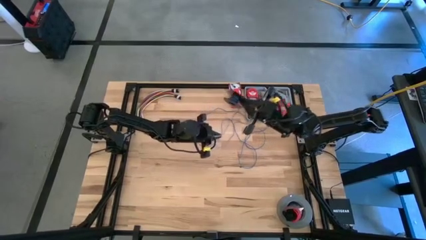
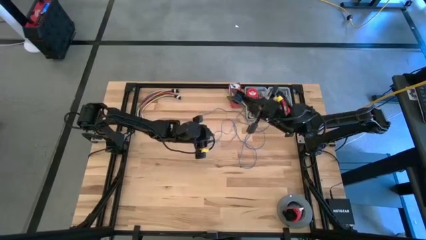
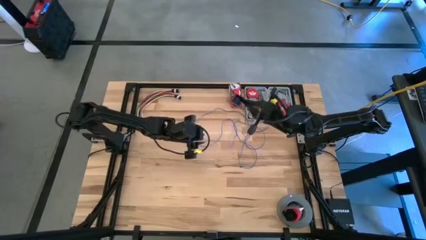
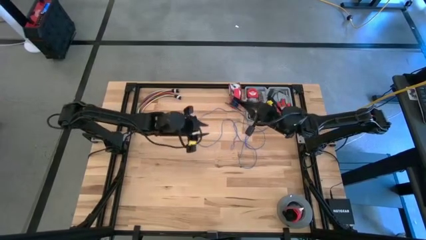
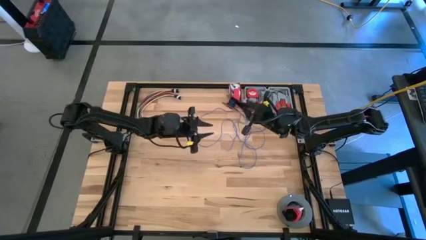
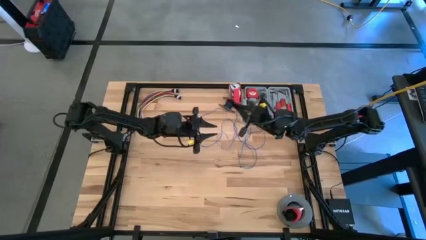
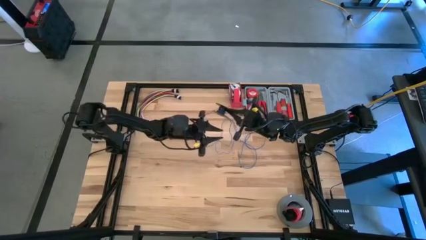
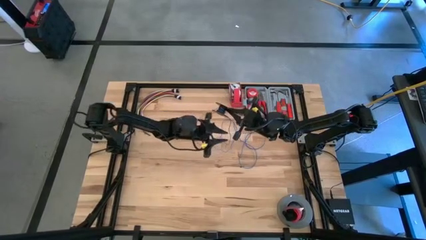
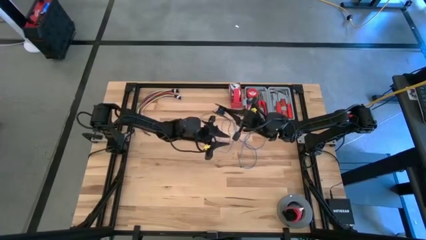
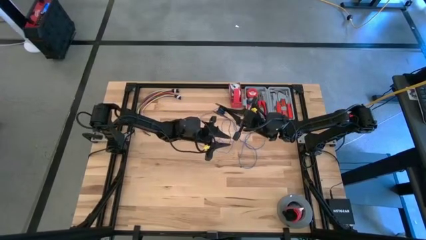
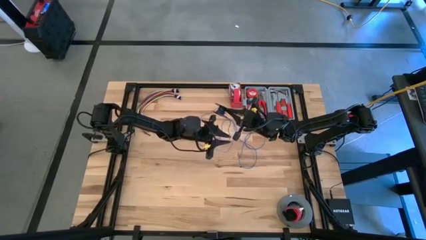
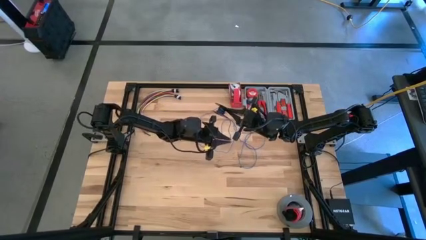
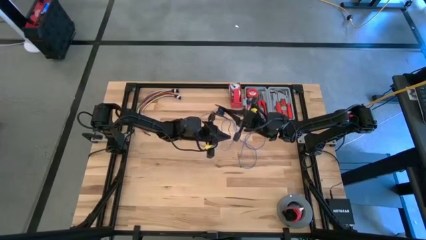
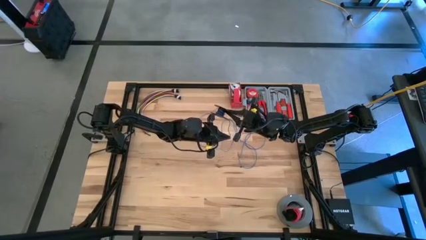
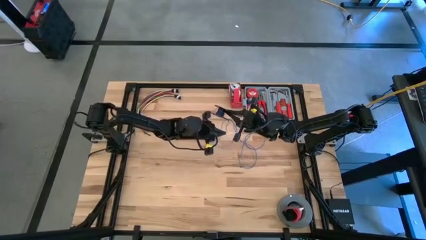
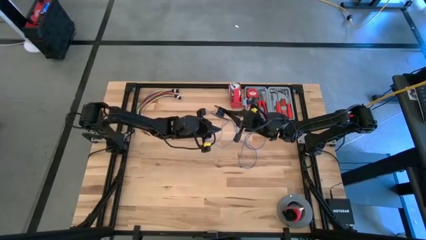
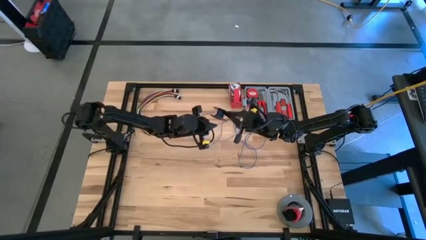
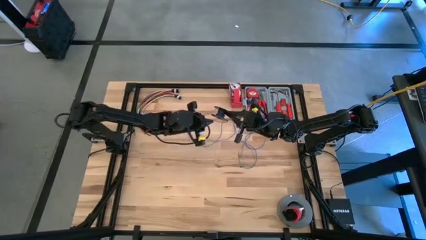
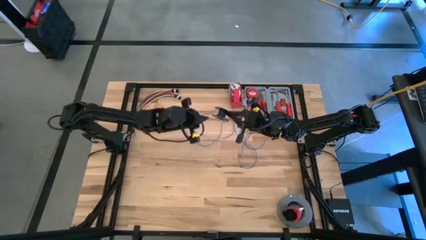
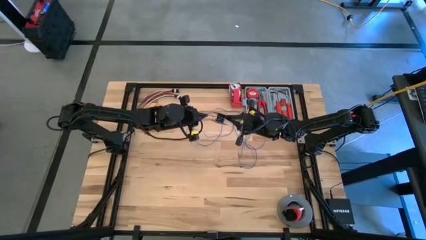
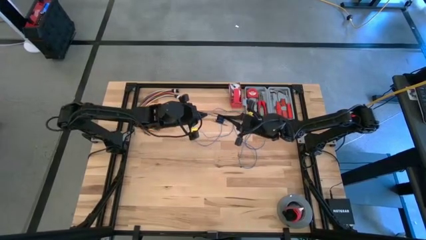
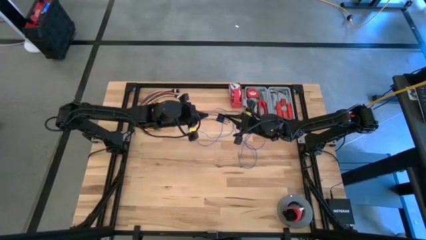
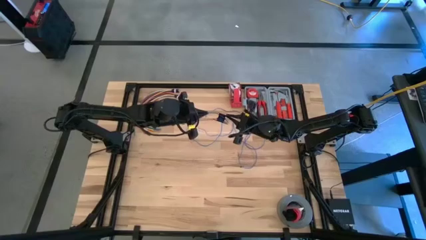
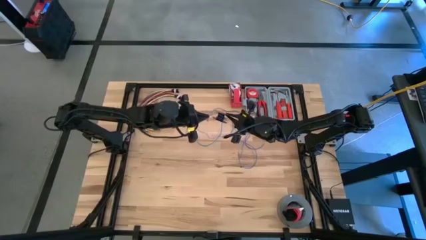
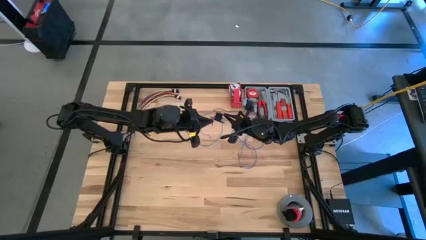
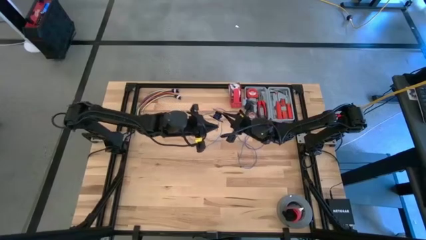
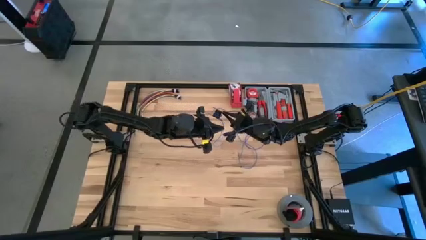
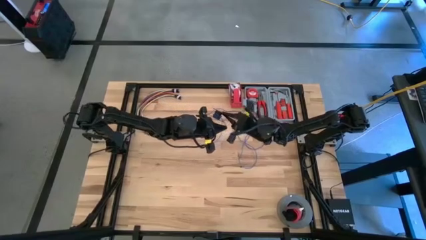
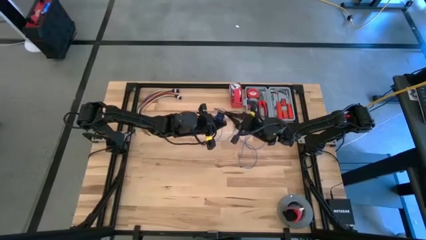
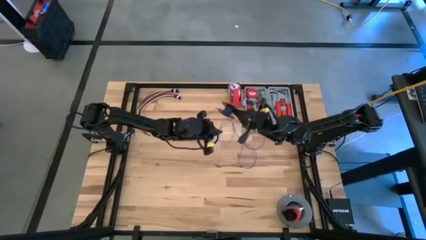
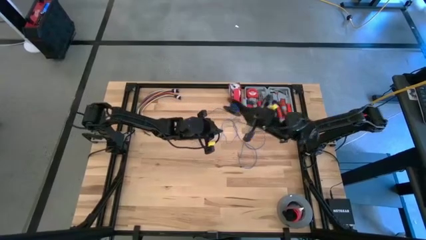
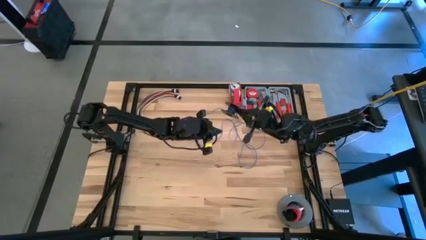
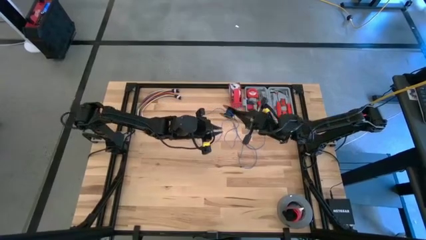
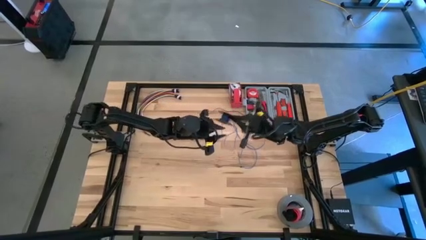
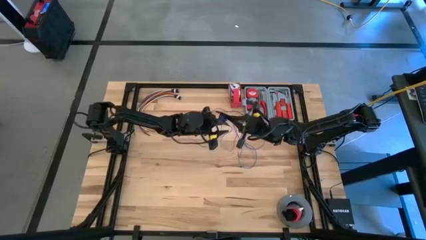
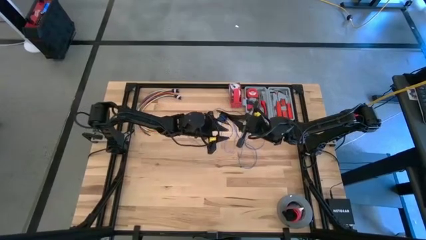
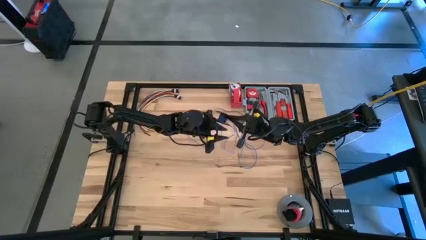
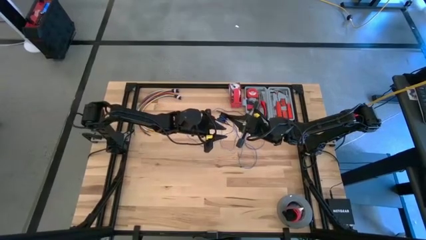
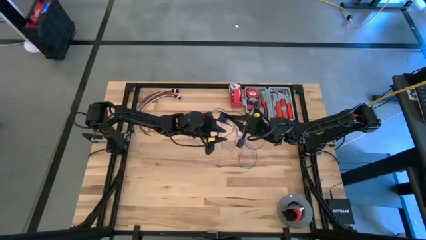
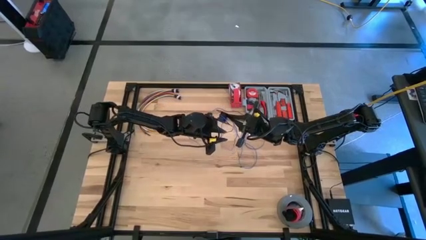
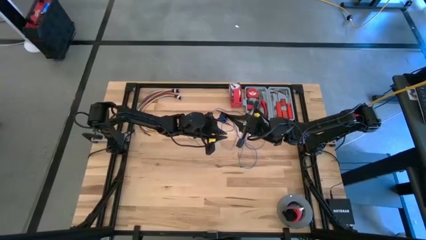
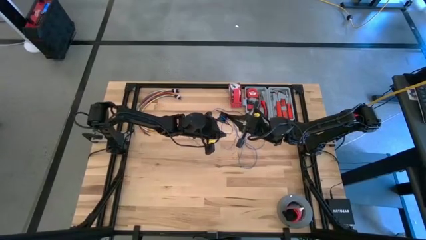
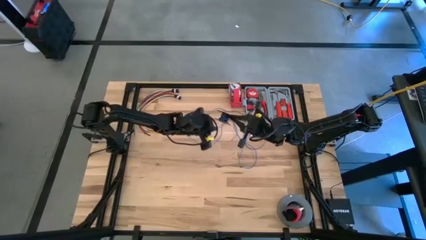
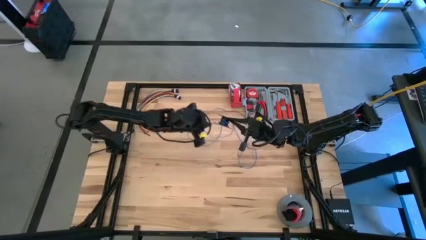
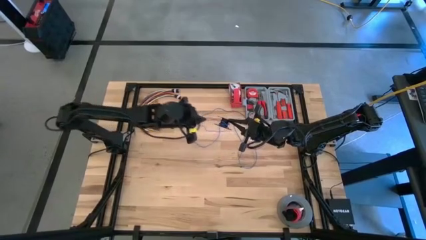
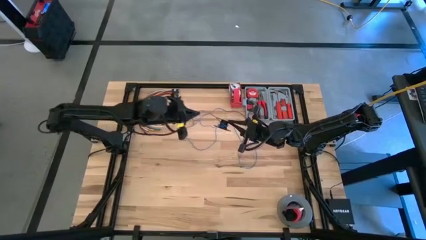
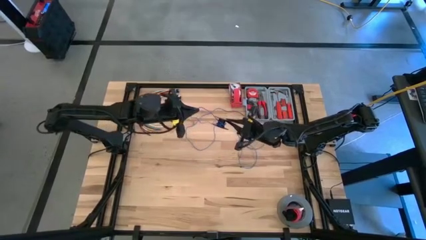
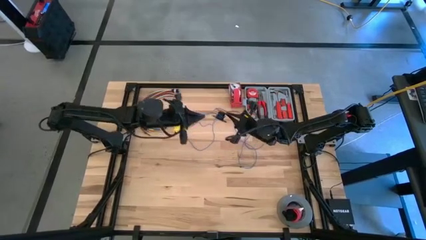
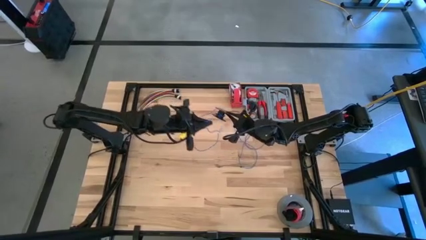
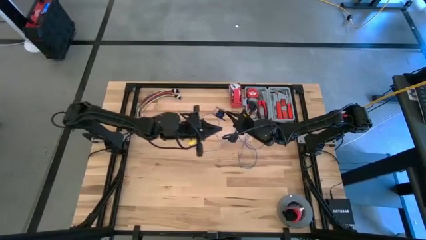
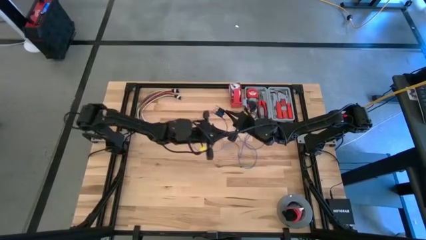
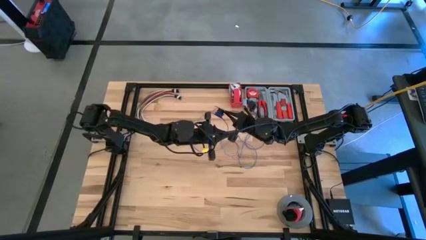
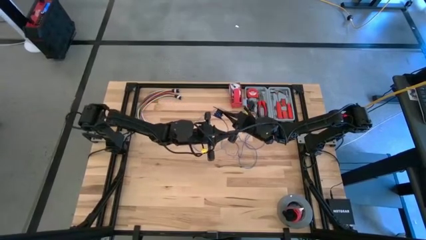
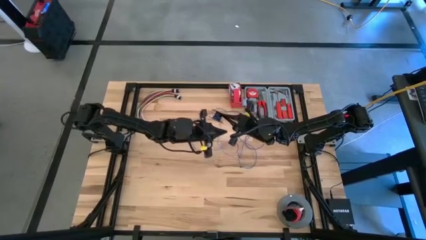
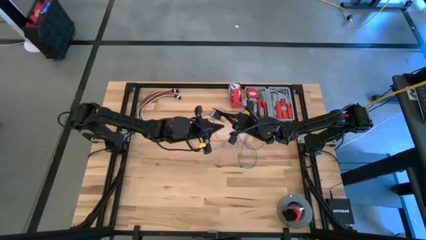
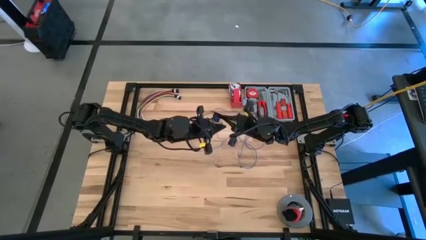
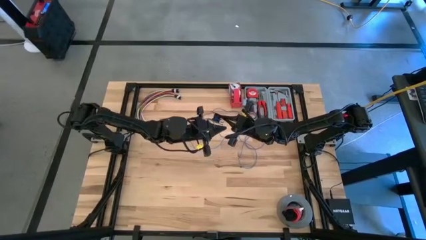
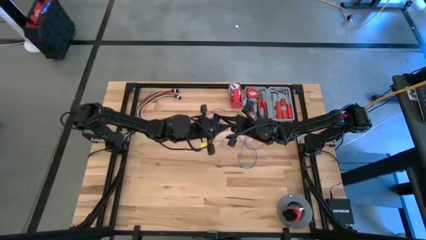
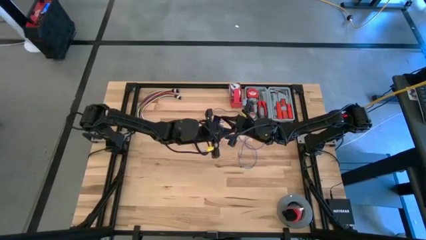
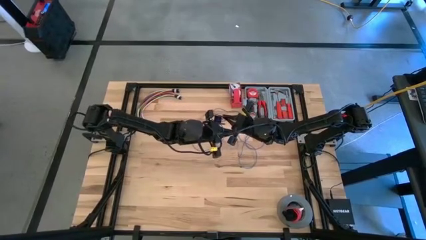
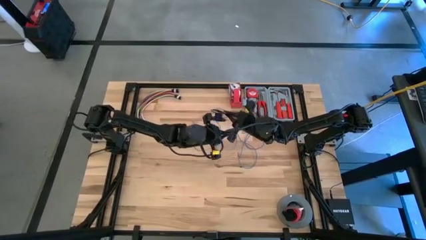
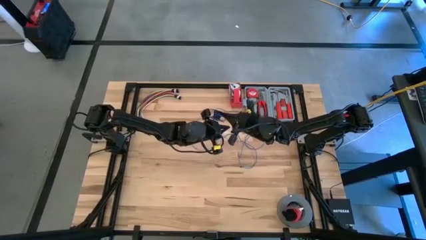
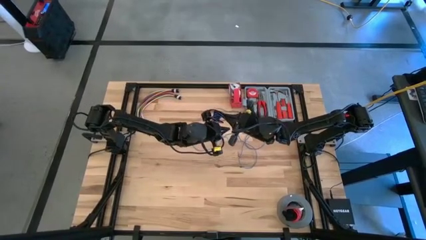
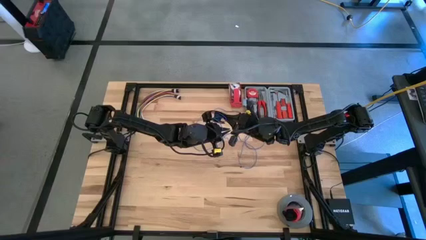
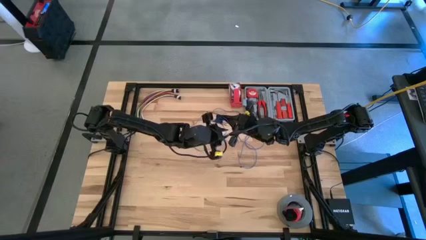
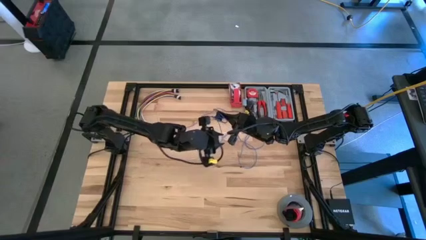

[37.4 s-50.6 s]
Task: Coil cords
Coil the blue wire on the black spool

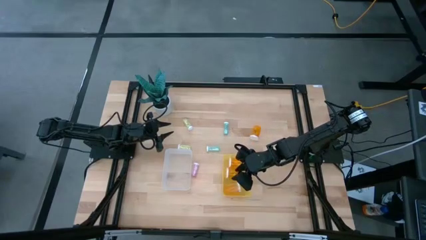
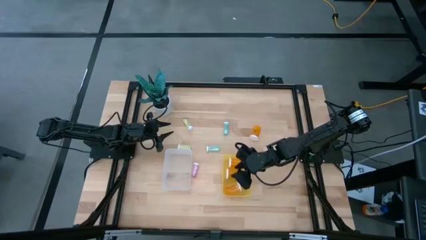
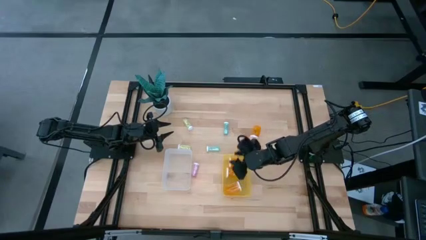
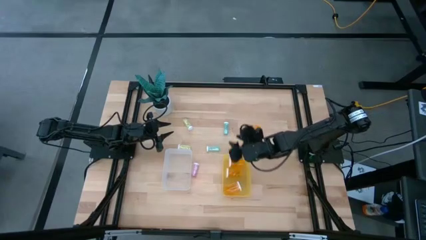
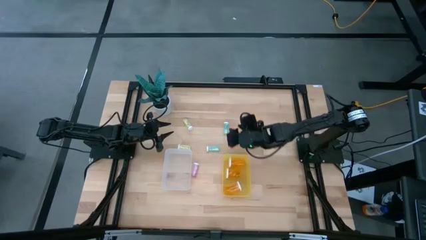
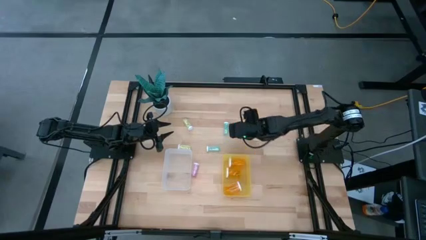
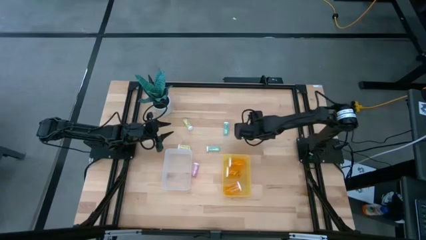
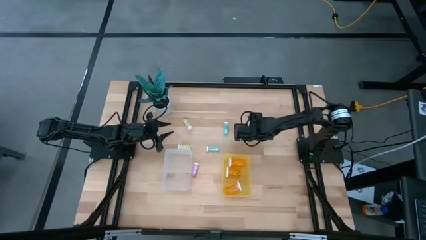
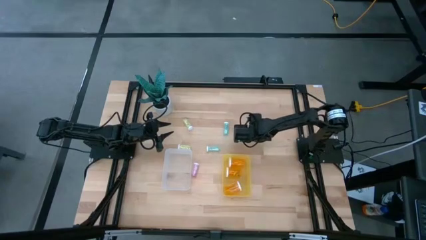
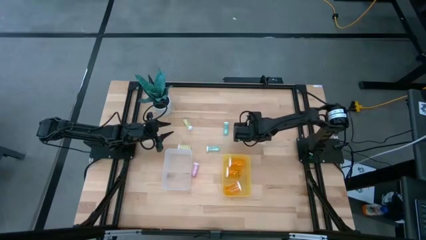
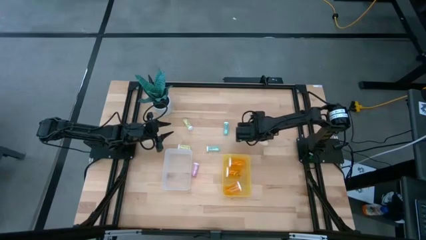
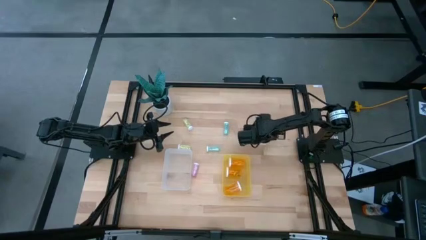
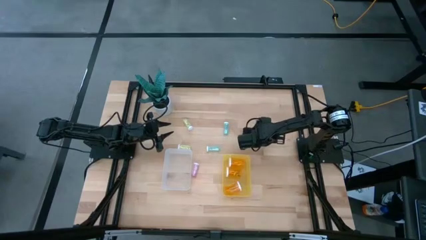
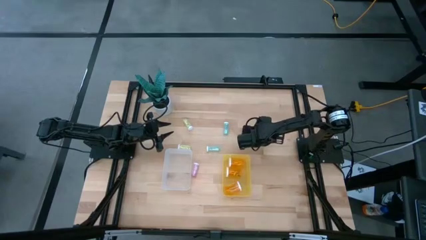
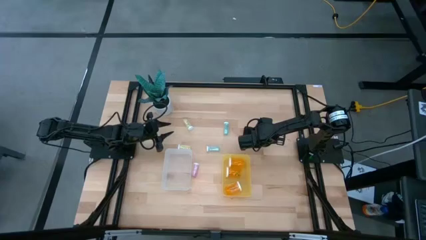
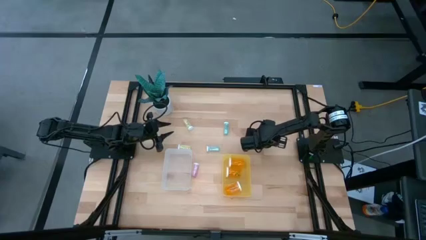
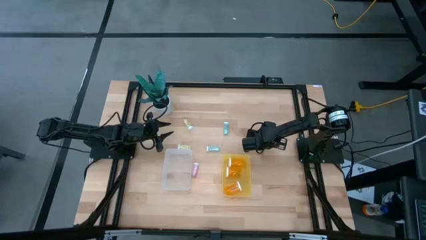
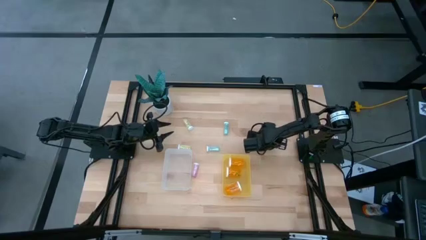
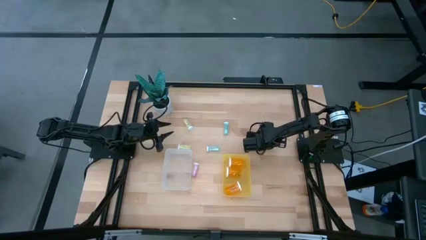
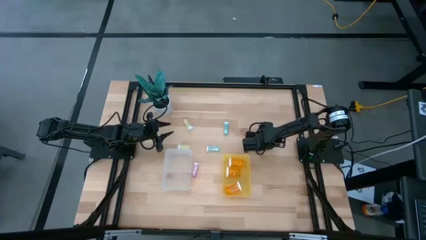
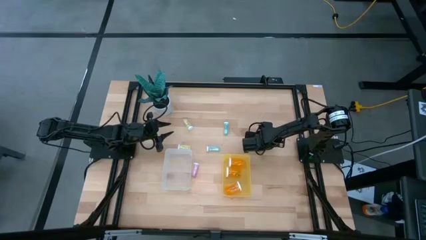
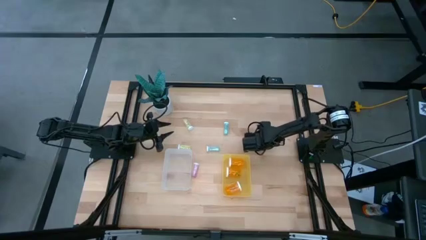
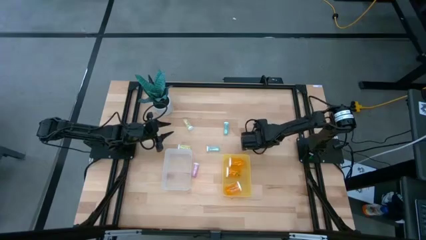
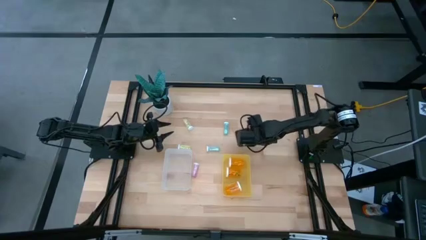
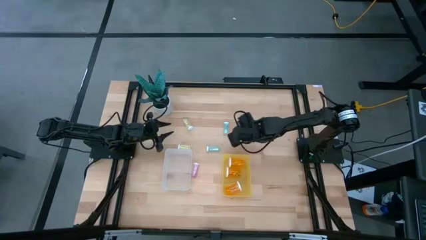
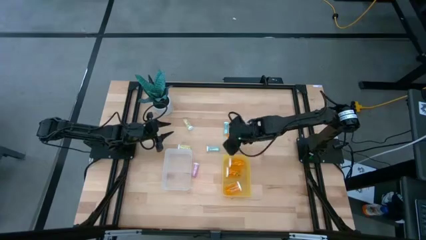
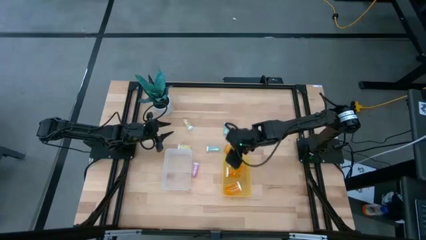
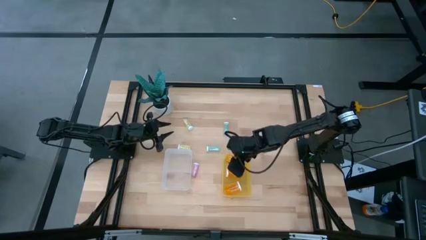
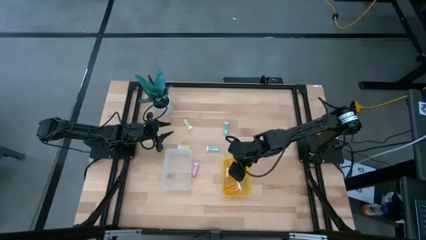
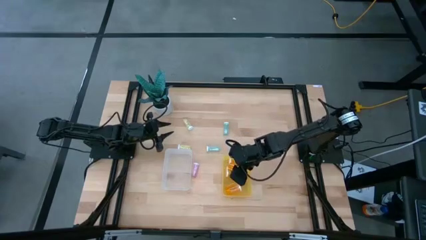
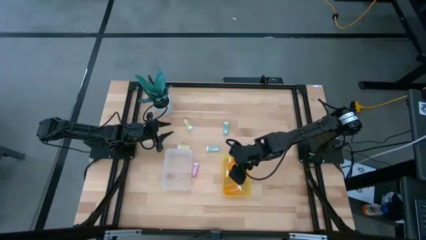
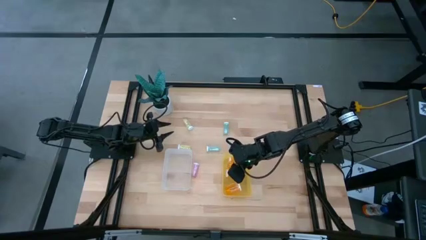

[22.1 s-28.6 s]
Task: Pick and place medicine bottles into bin by pill shape (circle, oval)
Put the orange pill bottle into the yellow bin
